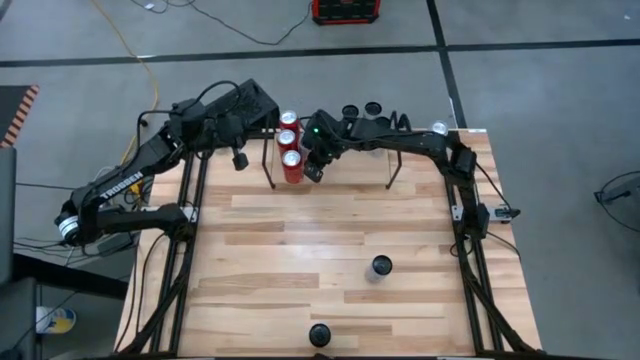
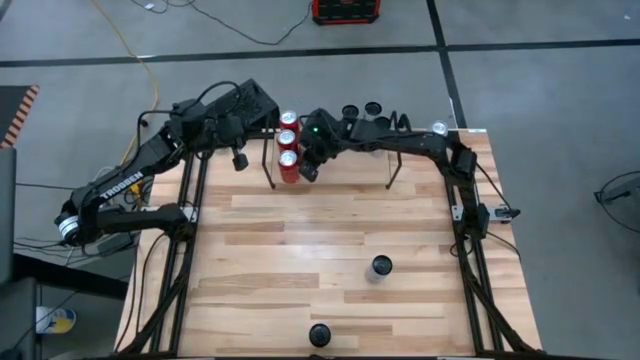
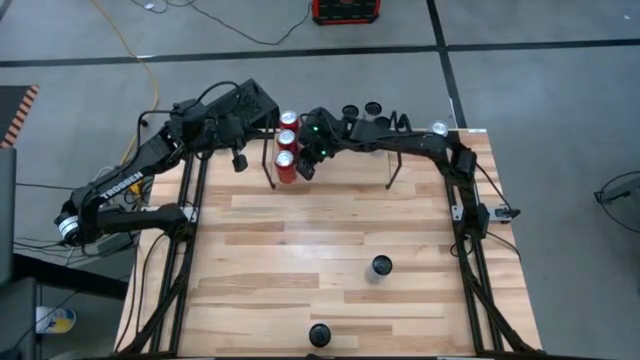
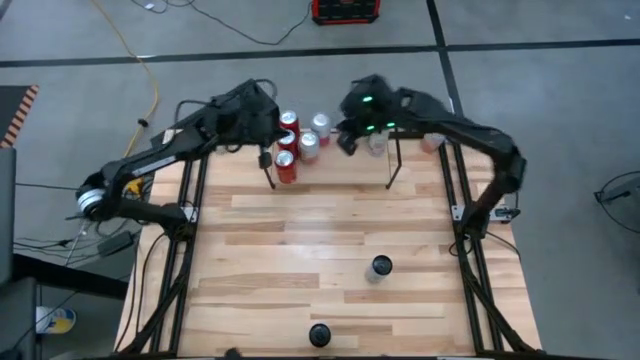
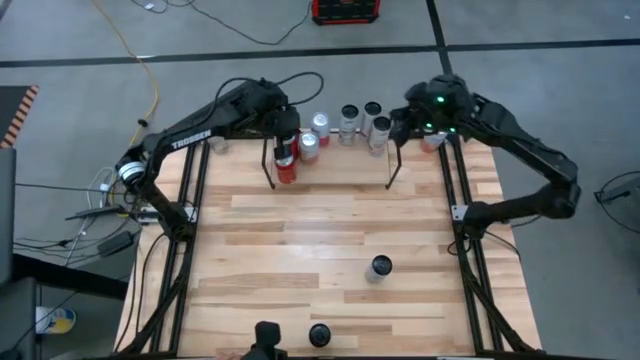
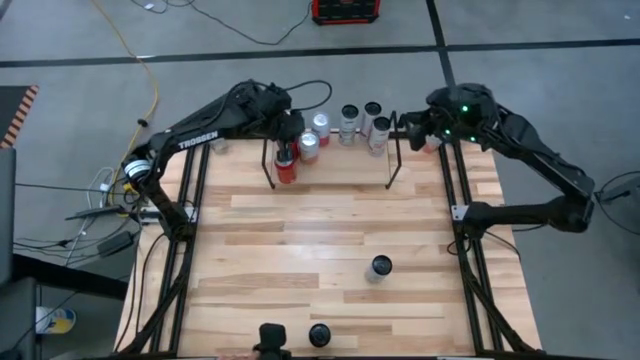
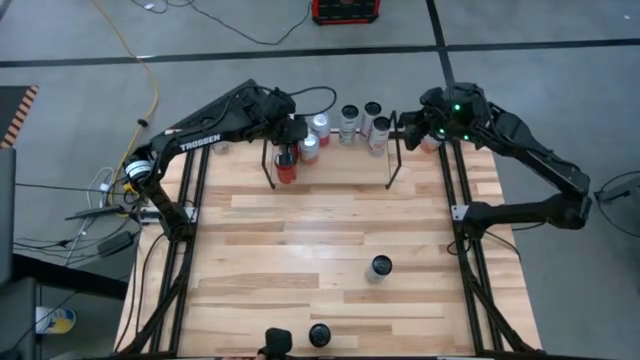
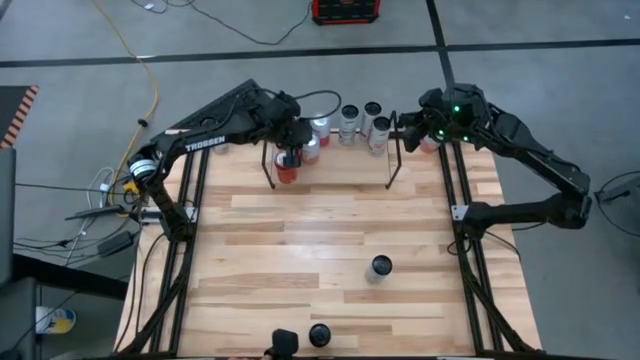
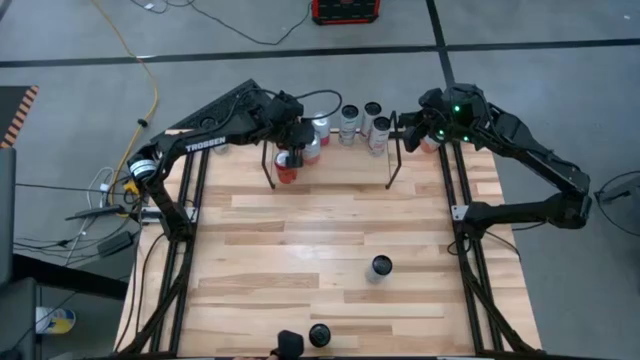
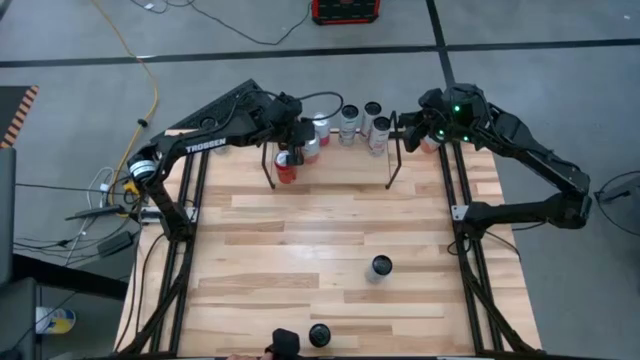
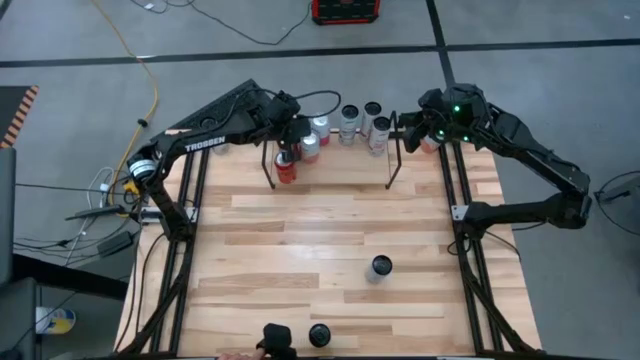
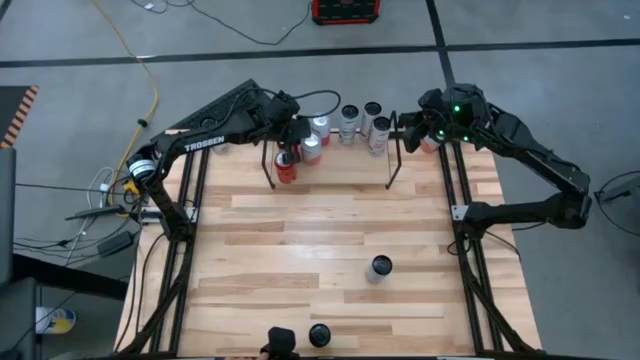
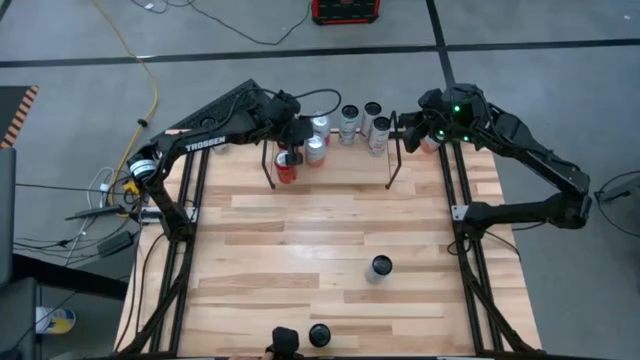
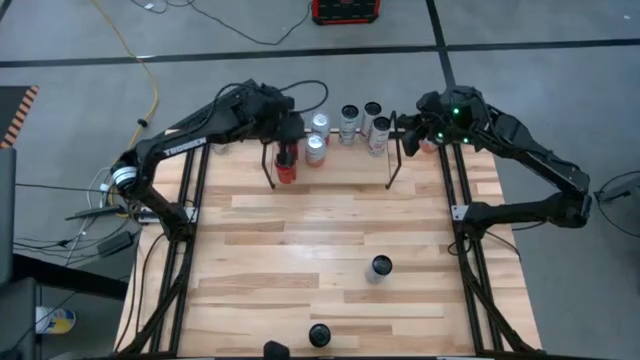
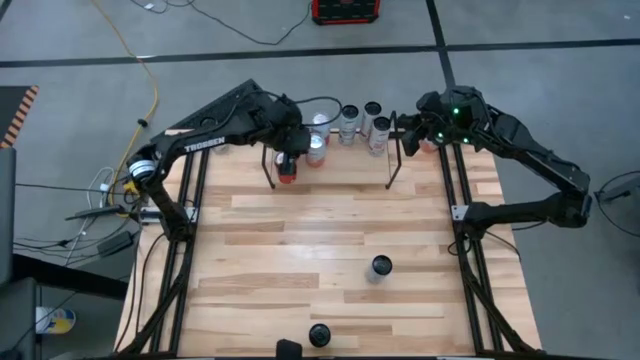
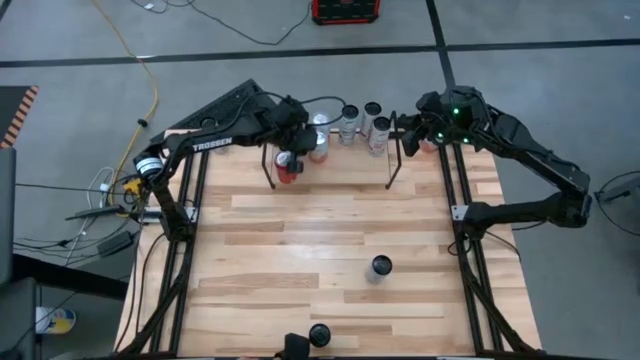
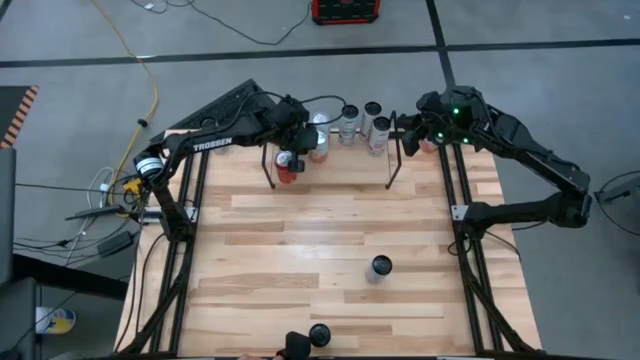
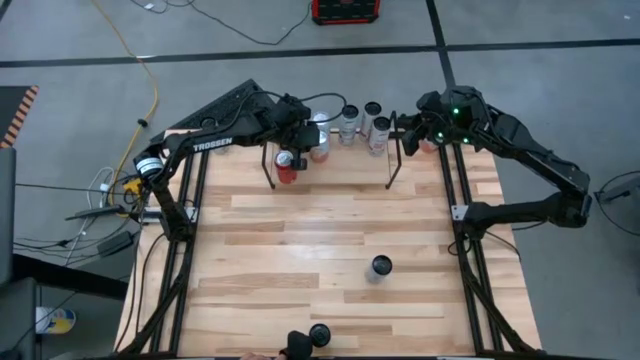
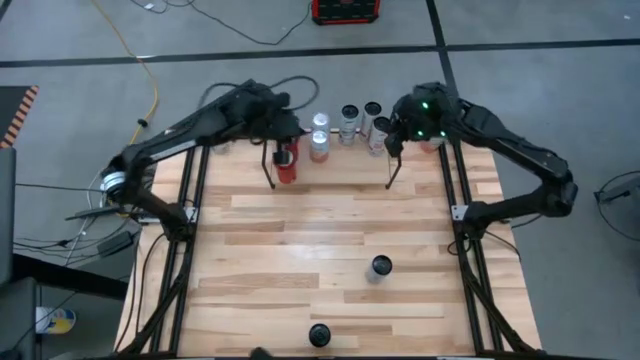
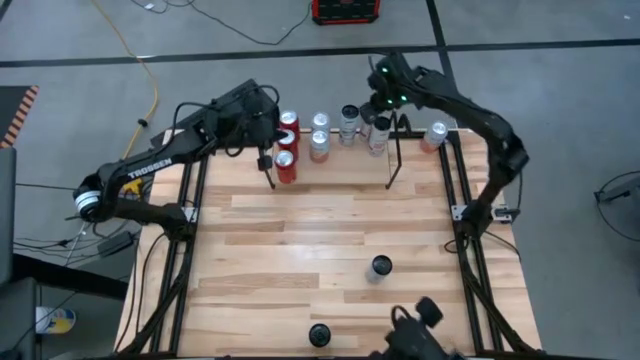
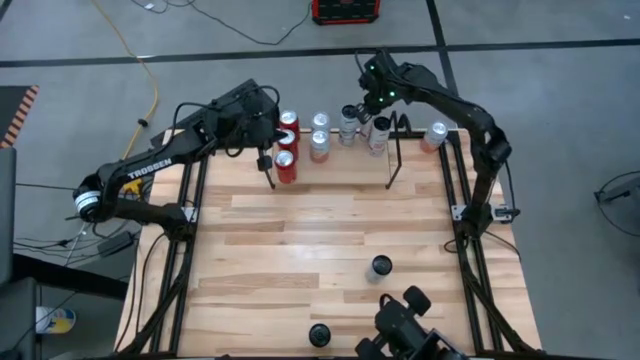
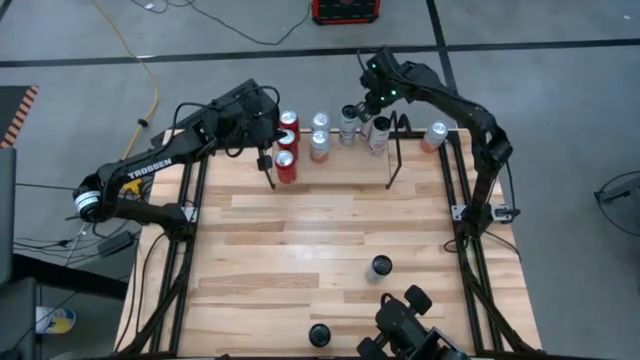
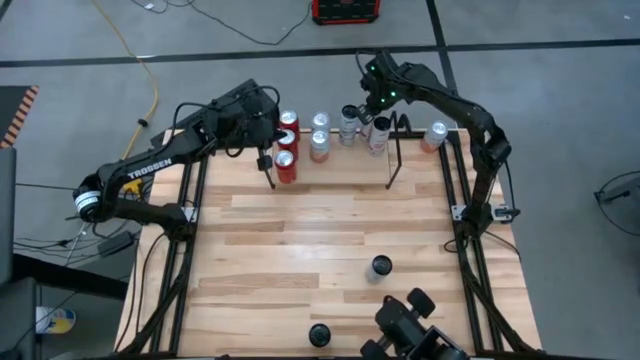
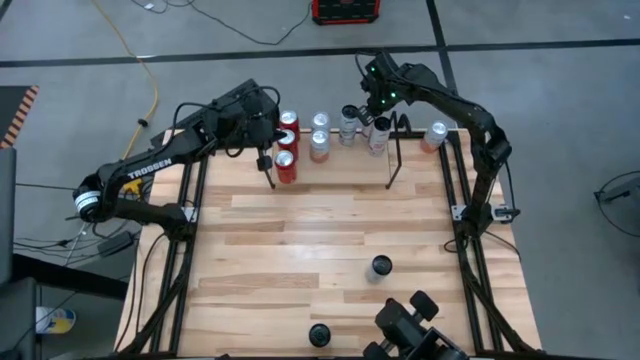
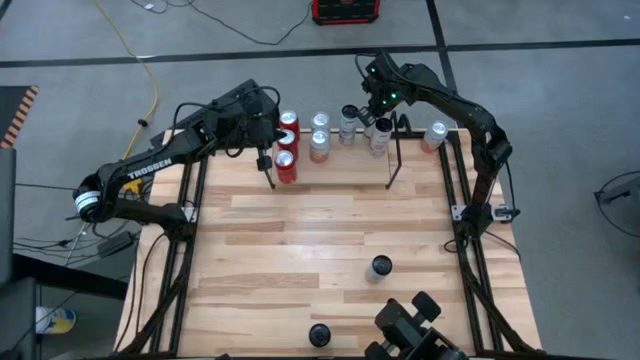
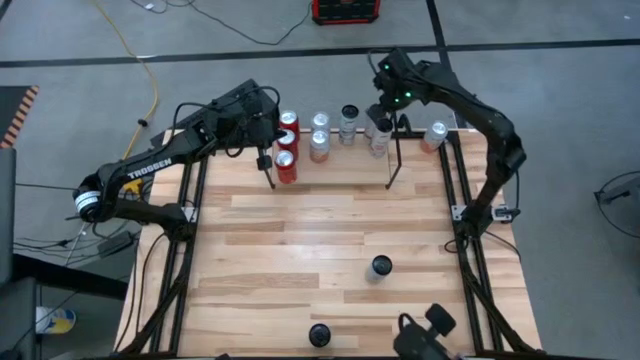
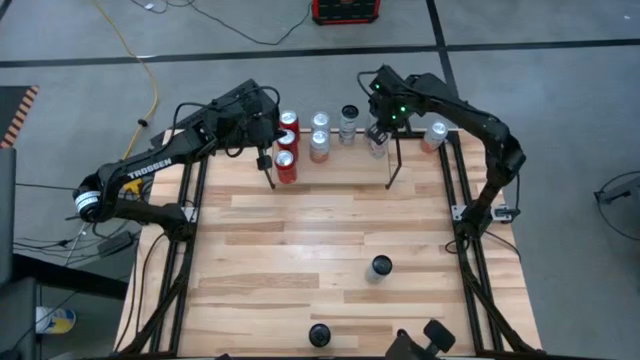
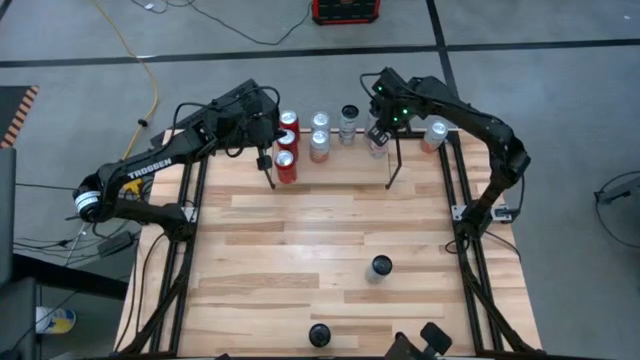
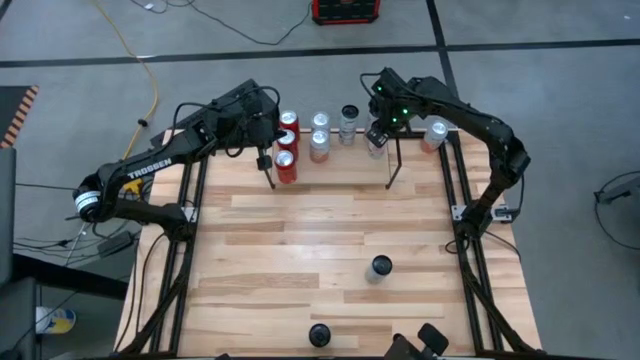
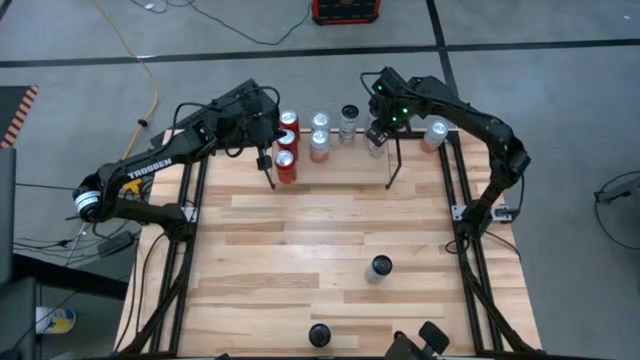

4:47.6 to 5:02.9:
Task: Place canned beverage on shelf
Adjust the soda cans on the shelf
